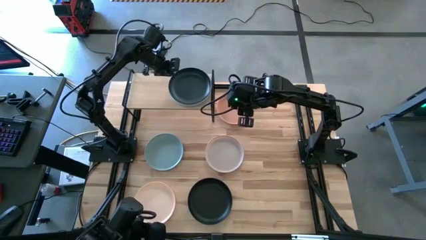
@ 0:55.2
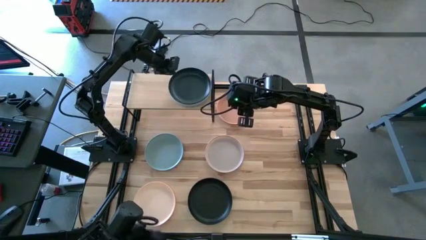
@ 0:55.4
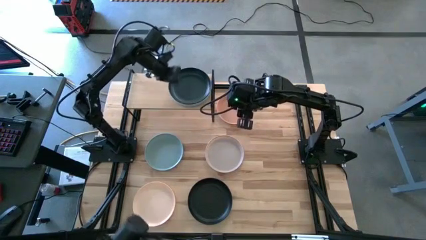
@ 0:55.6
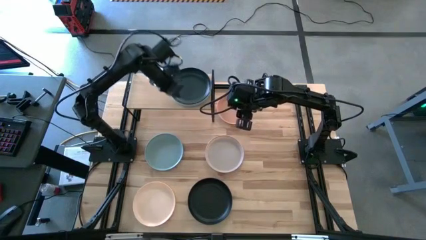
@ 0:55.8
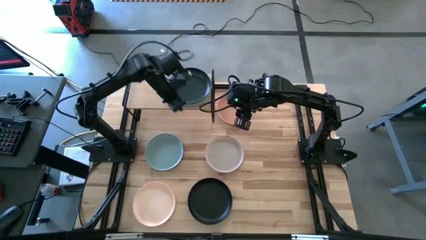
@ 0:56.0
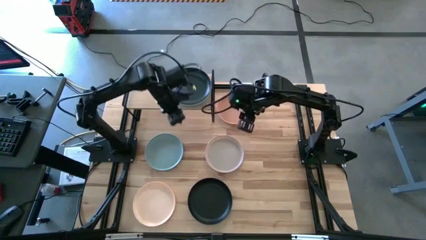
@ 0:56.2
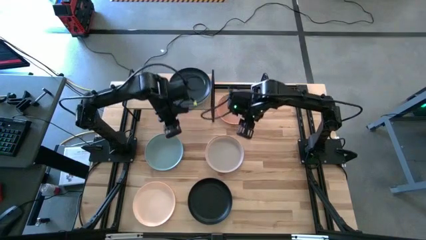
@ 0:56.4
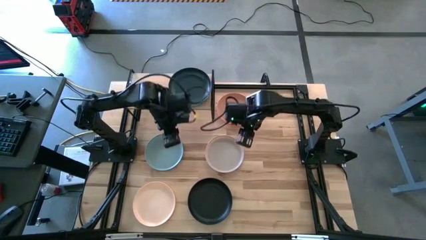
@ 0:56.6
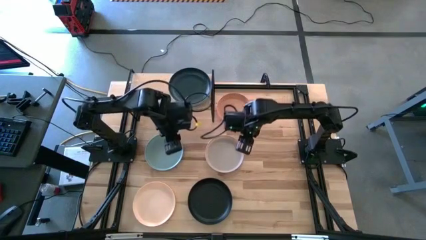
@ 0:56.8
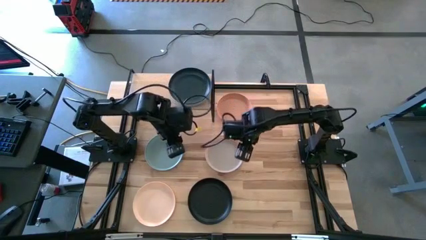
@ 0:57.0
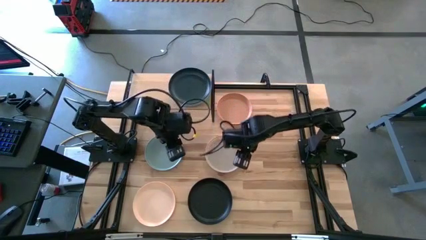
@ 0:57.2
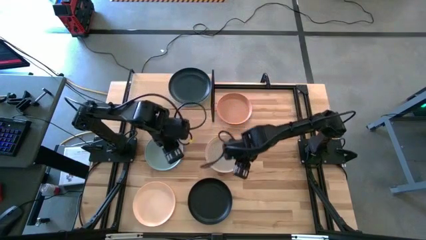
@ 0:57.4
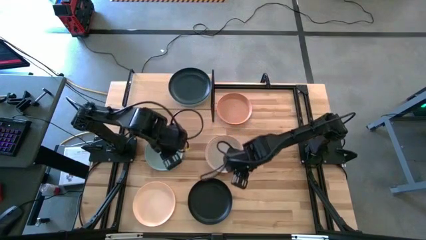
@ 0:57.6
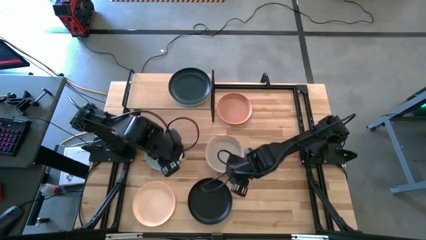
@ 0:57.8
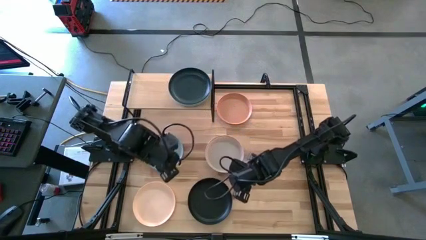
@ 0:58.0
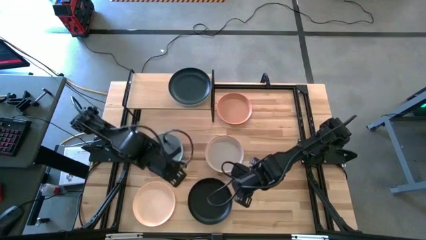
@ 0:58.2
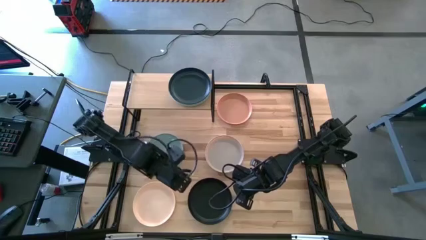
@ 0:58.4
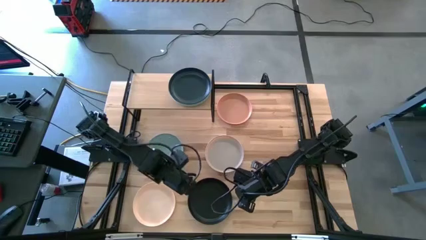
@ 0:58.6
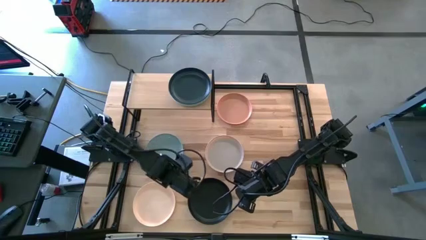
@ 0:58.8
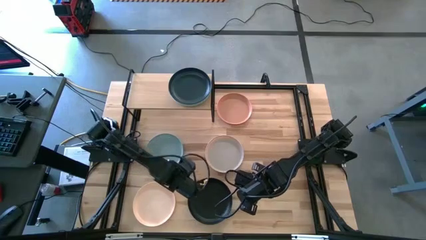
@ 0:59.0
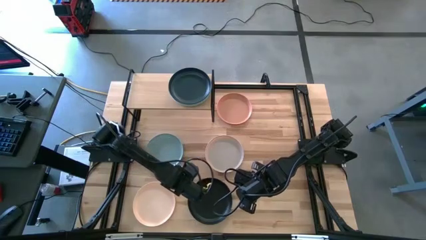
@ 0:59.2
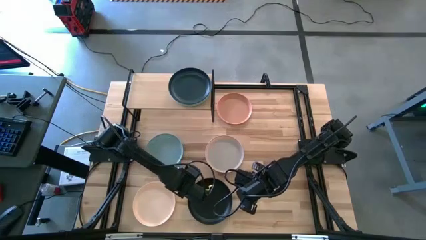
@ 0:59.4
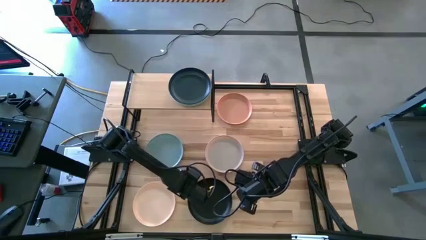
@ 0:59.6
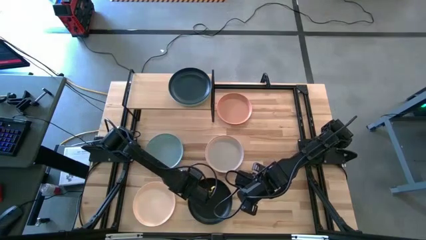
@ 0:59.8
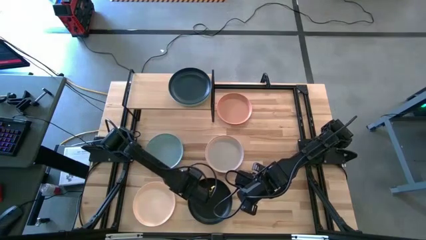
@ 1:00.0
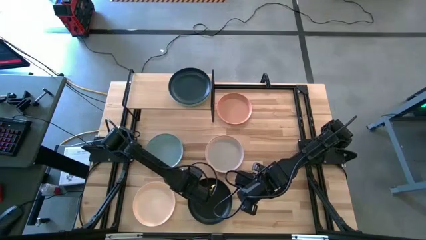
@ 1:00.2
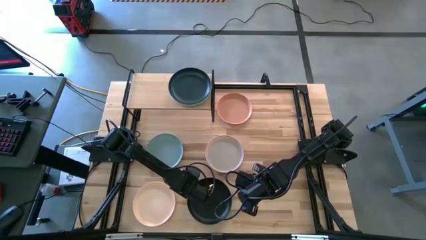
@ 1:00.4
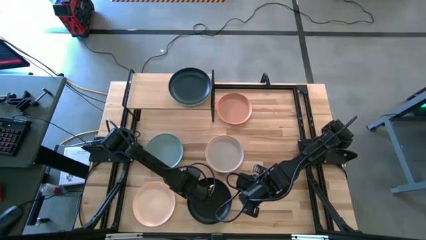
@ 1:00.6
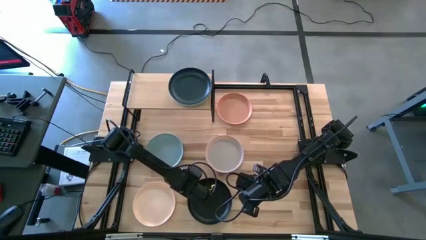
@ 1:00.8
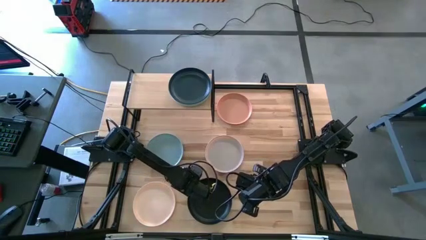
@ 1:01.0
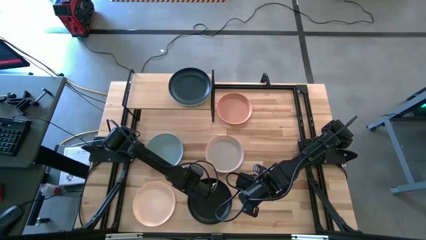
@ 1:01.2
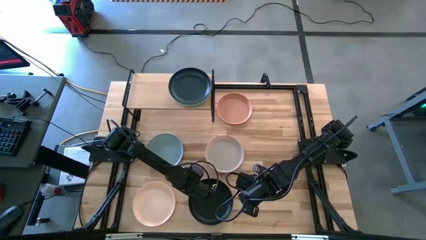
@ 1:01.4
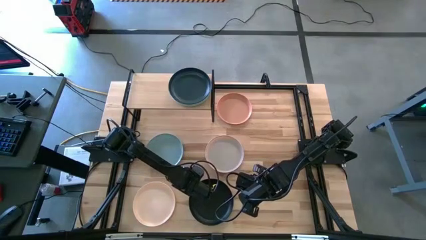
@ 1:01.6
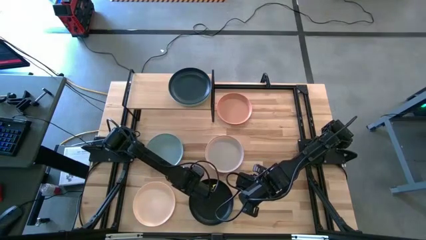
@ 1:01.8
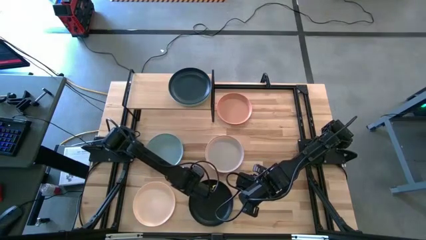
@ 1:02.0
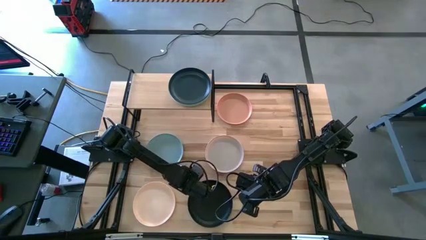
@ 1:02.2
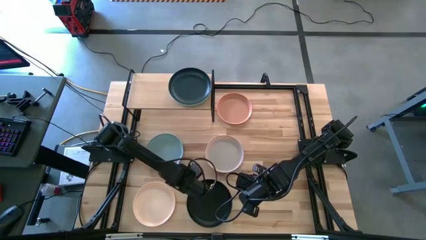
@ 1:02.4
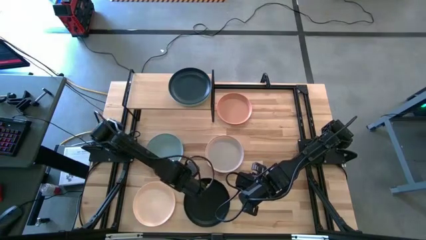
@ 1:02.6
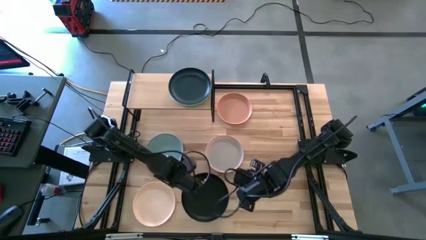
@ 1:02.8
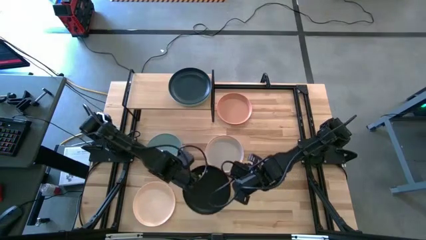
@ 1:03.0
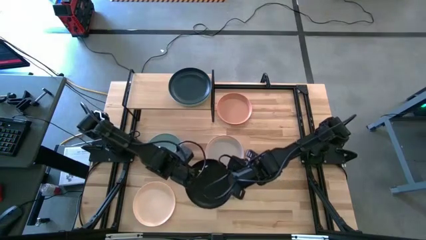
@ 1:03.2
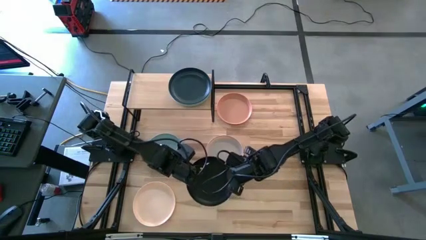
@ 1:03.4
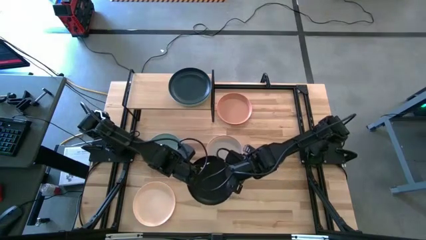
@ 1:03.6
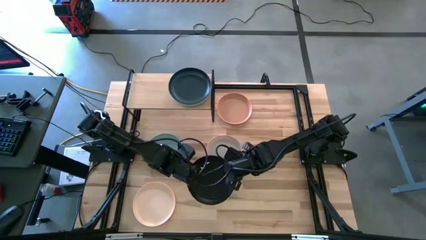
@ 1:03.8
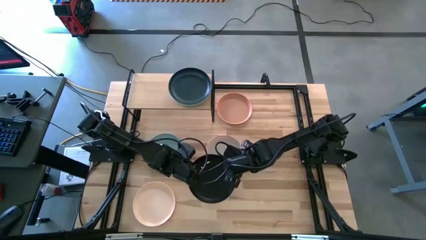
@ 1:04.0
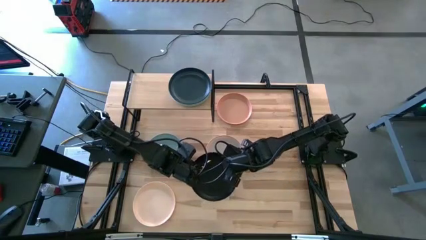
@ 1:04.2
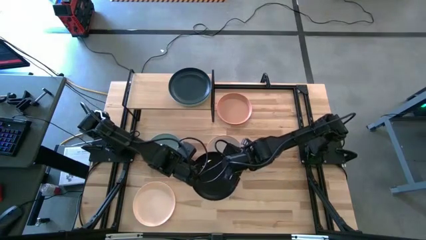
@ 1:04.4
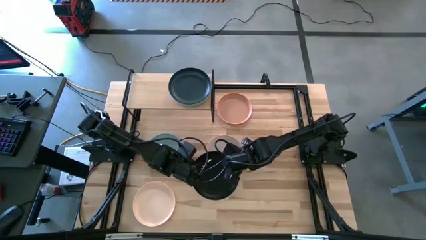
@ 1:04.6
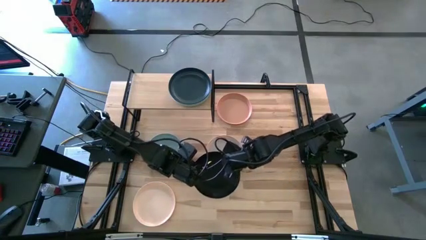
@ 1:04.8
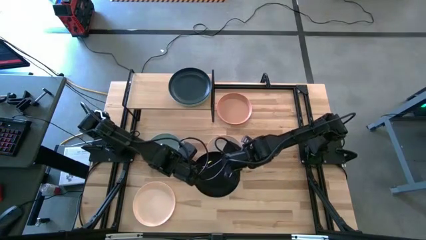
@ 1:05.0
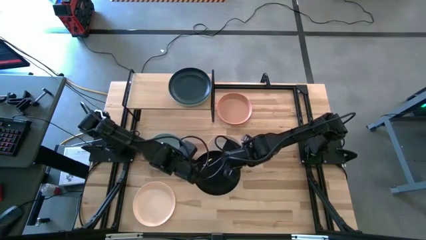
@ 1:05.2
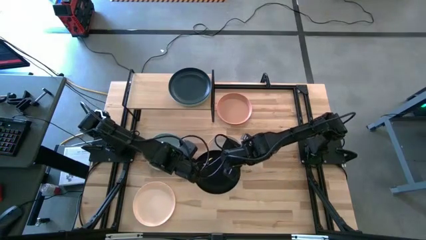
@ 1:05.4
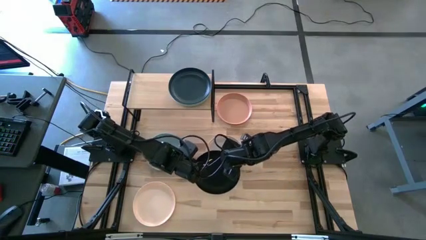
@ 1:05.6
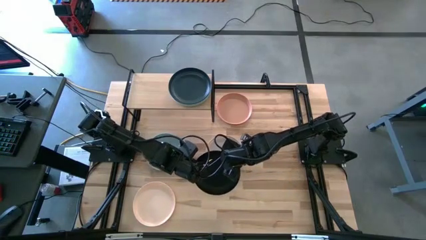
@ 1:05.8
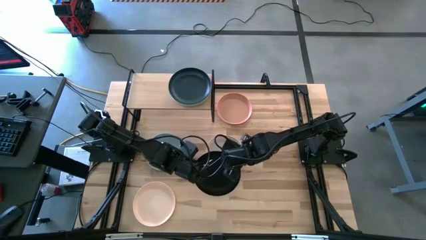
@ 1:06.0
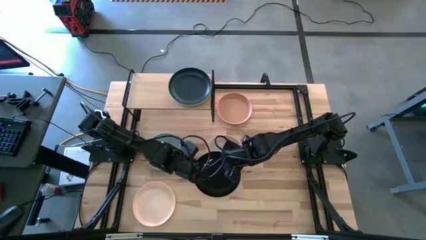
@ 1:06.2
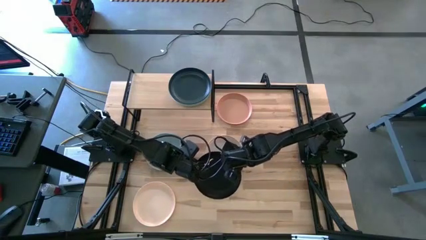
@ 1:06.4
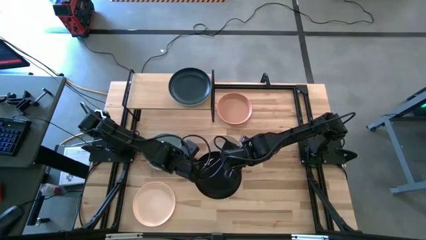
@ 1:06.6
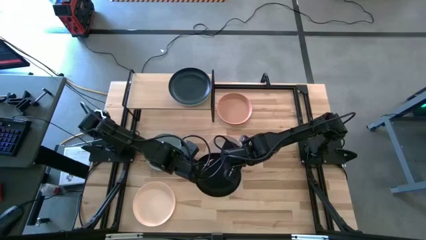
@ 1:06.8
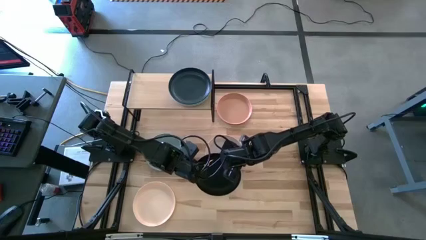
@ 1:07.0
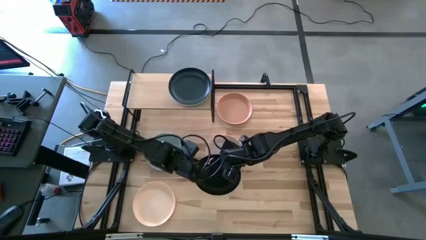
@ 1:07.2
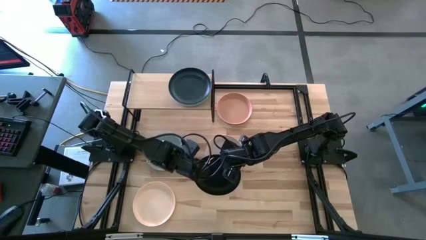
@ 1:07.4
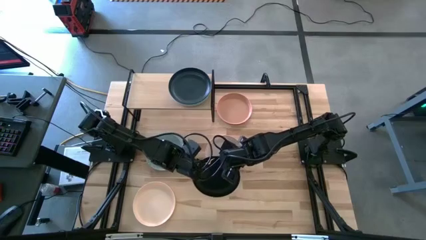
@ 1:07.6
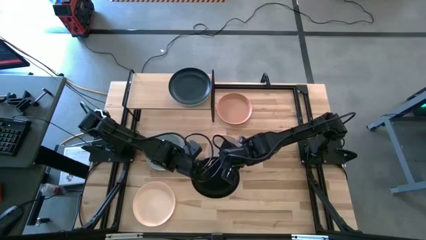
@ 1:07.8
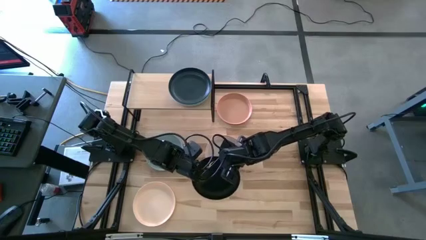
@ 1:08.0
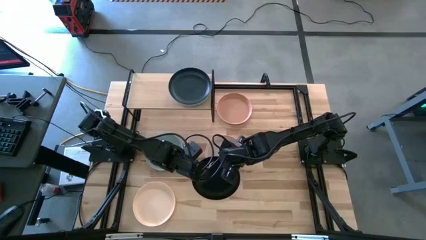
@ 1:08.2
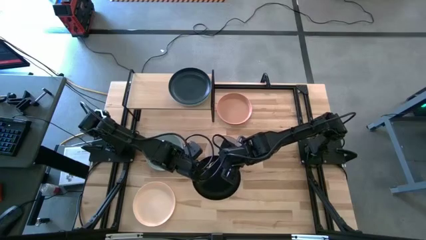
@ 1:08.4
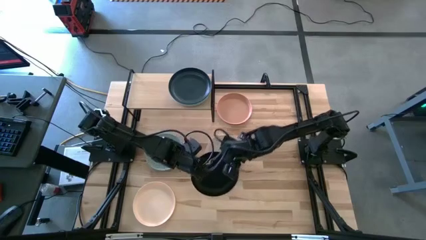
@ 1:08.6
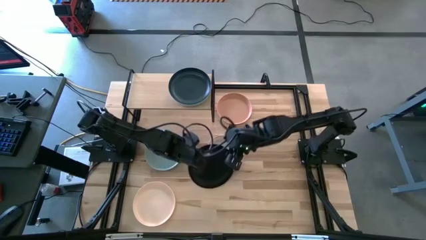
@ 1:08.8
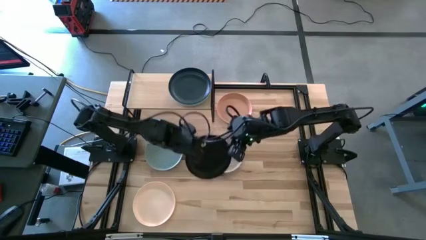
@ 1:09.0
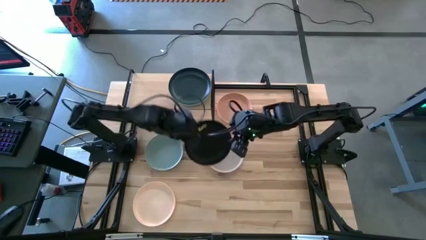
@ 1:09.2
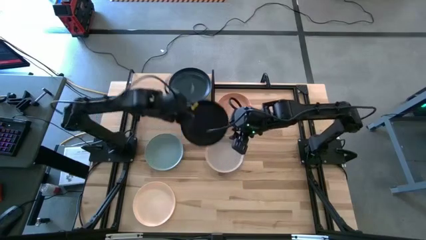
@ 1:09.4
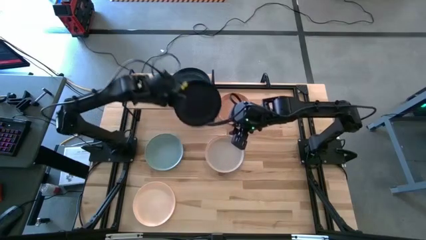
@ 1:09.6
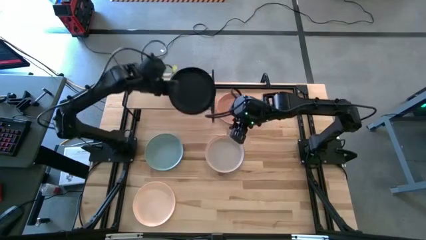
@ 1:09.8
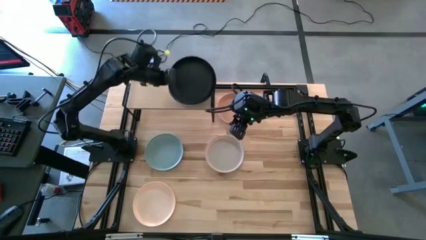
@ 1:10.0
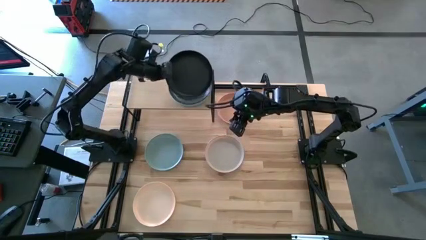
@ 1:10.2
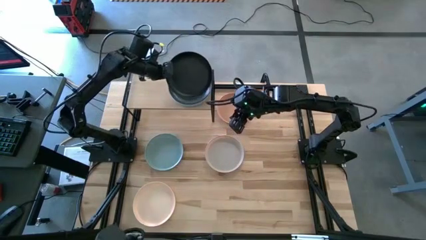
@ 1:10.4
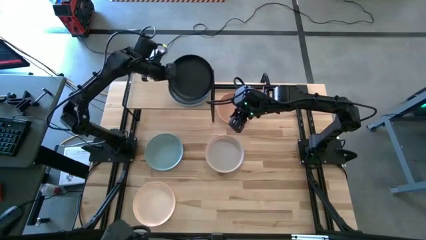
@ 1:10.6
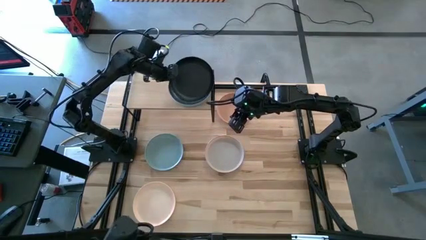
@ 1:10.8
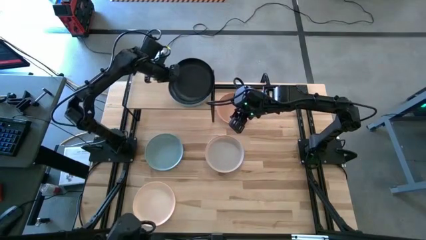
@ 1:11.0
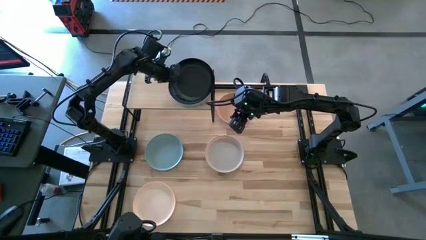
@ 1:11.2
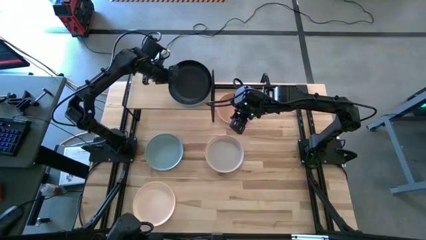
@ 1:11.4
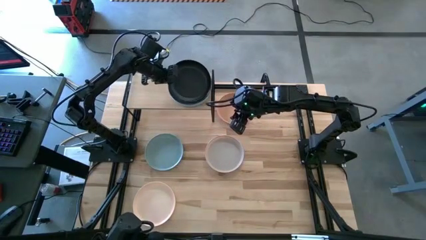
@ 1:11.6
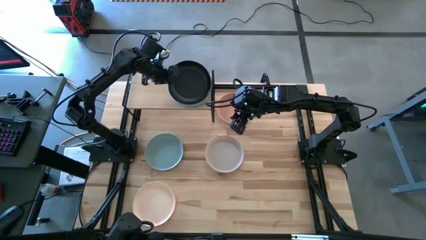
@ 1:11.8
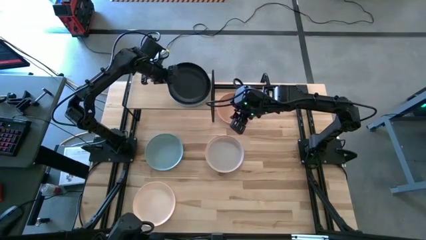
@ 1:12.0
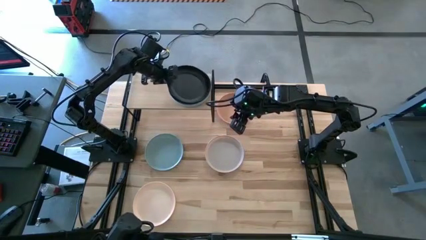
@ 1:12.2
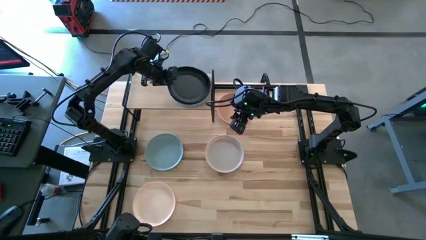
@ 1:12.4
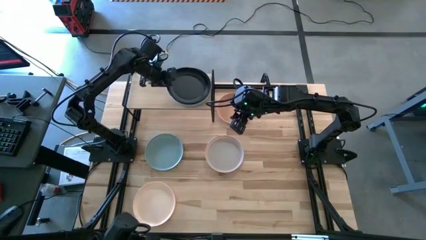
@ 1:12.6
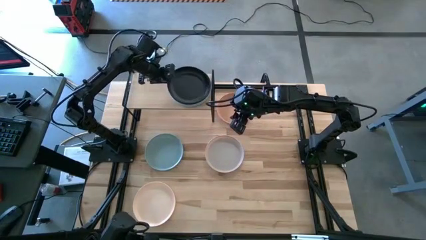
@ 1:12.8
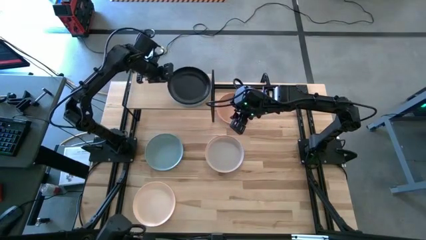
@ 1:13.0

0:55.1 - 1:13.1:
Task: Place and stack plates onto a shelf
Stack the black plate on top of the dark blue plate on the shelf
